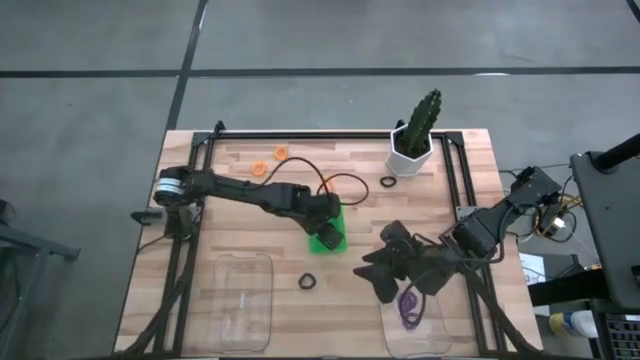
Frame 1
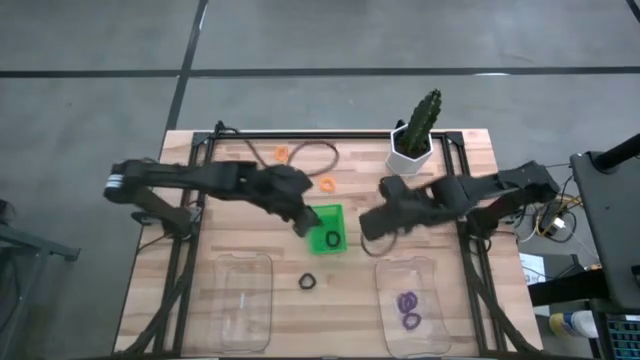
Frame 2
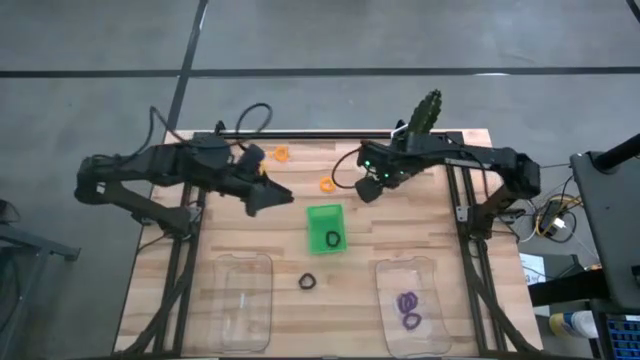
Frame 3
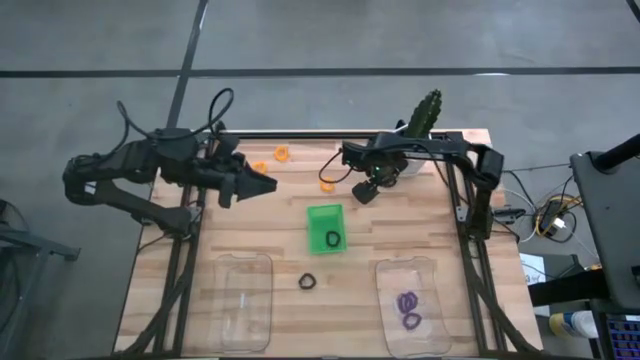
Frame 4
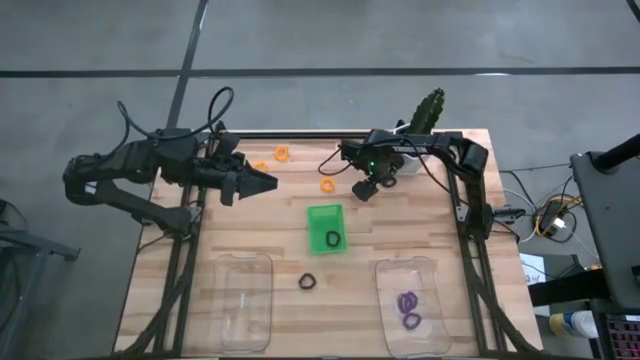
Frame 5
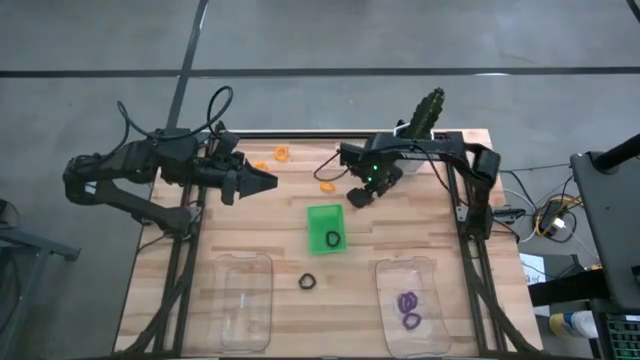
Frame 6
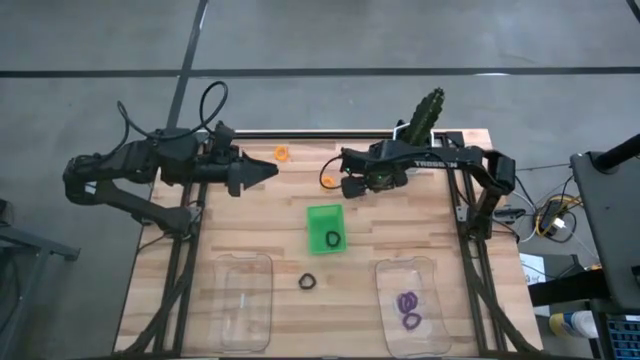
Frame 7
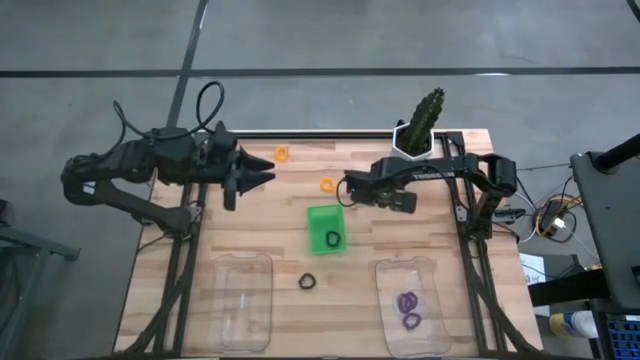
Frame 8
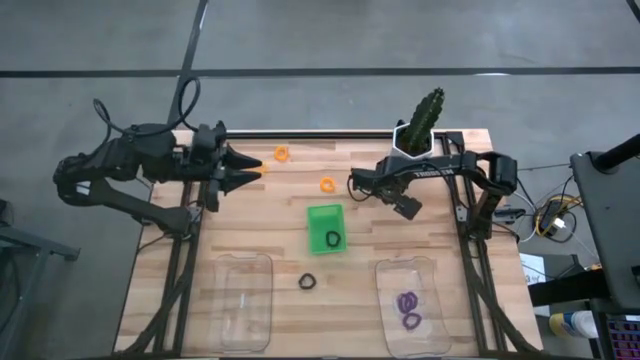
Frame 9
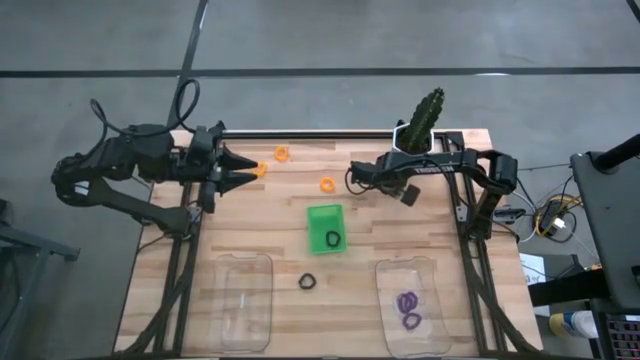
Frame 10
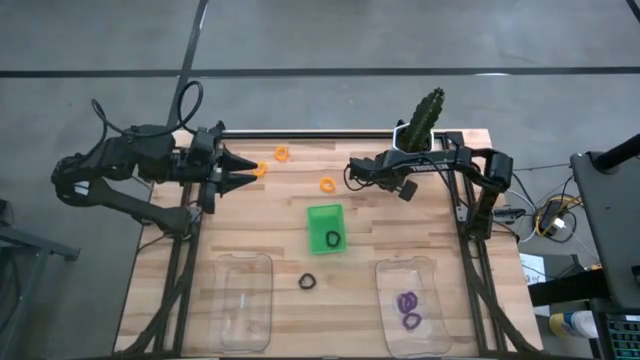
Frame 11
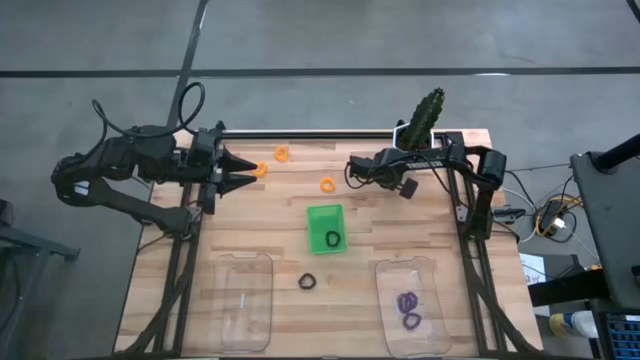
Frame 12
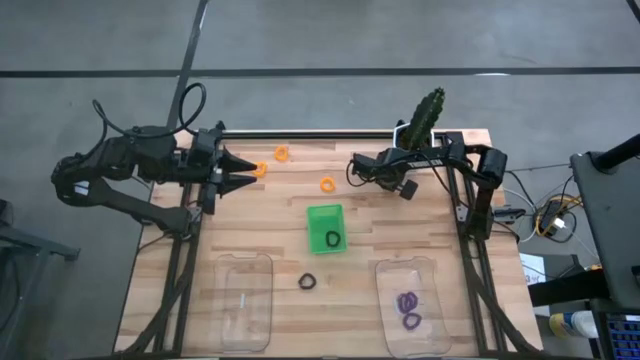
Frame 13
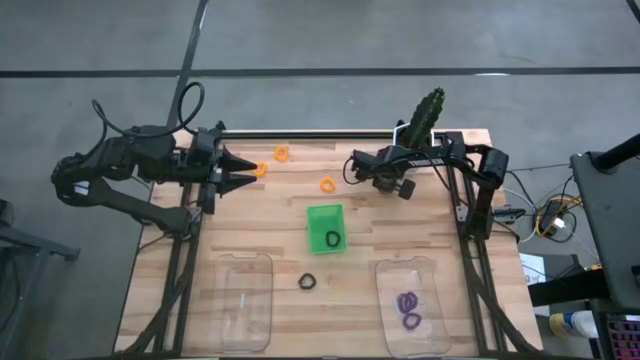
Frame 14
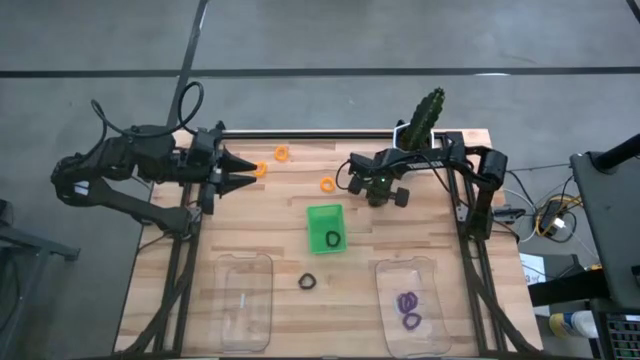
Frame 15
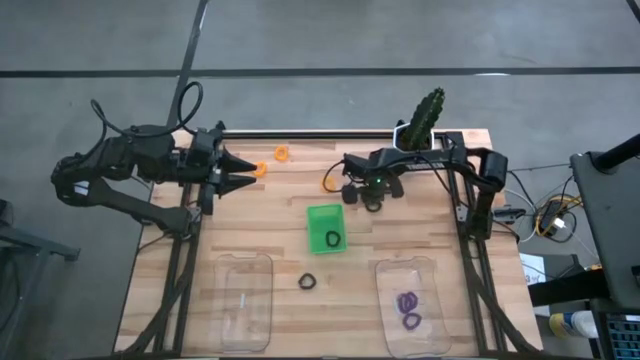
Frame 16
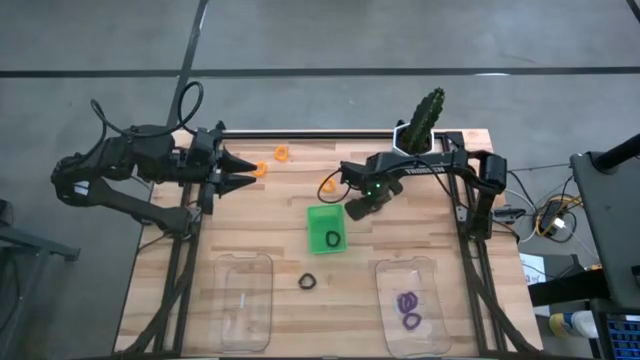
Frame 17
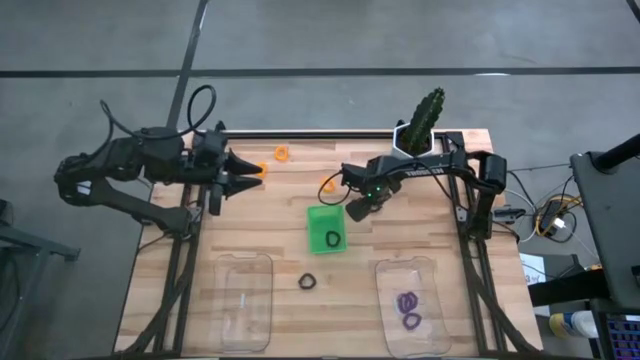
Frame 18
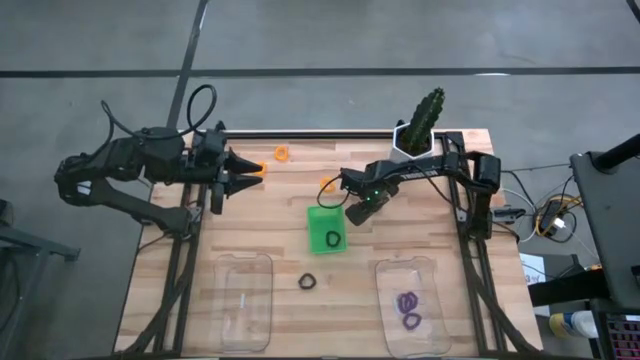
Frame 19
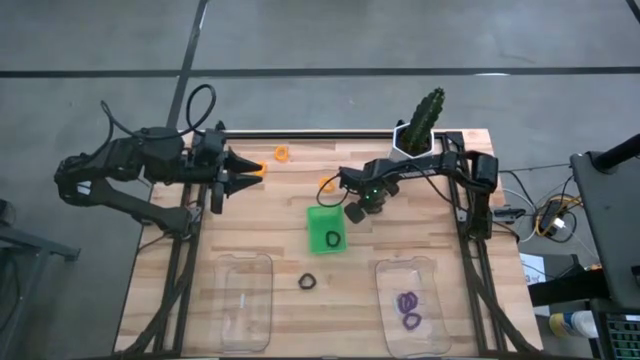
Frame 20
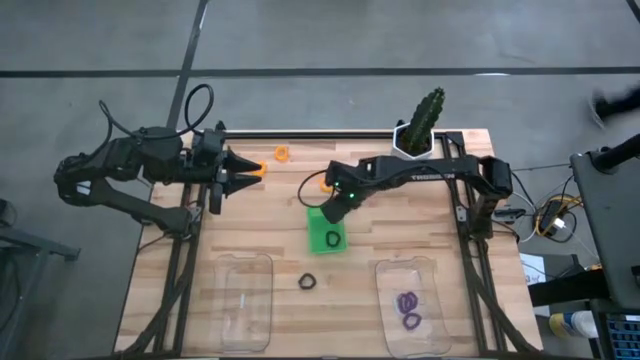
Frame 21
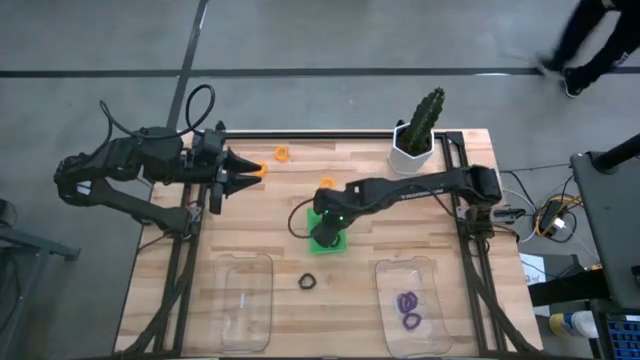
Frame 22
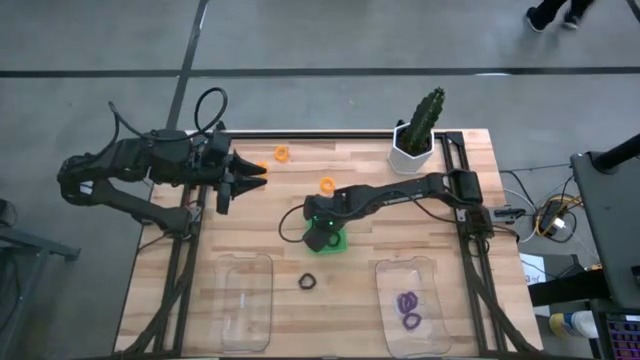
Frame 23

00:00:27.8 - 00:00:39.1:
Task: Sort spring keychains
Put the top black spring keychain into the green bin

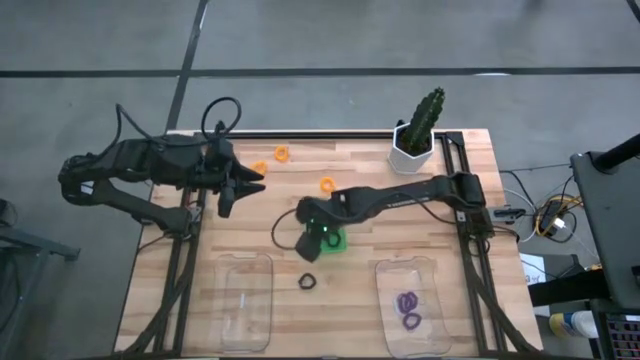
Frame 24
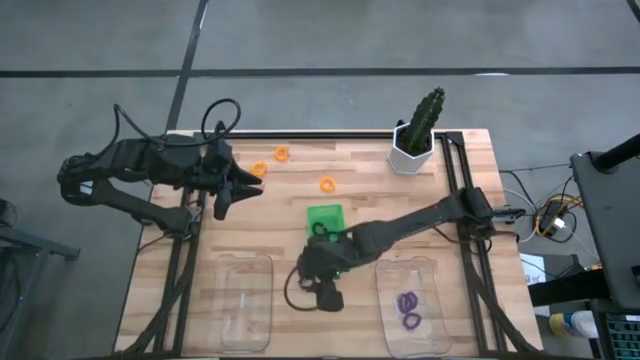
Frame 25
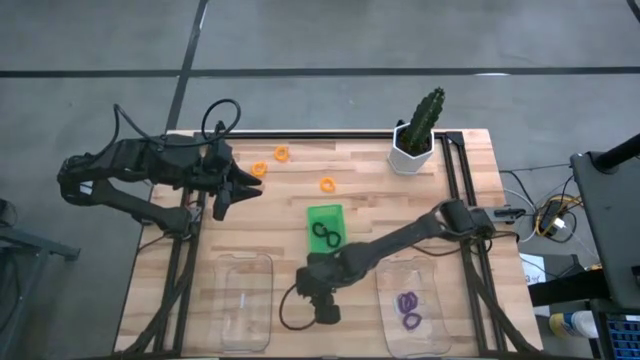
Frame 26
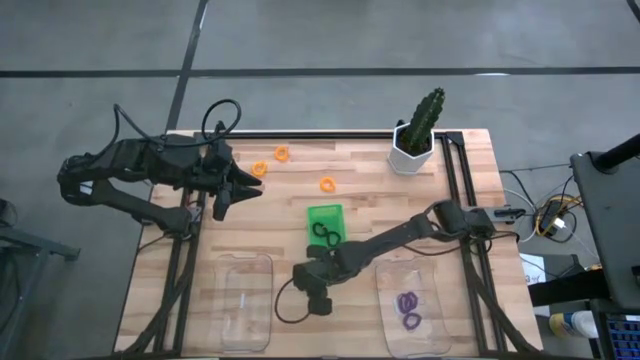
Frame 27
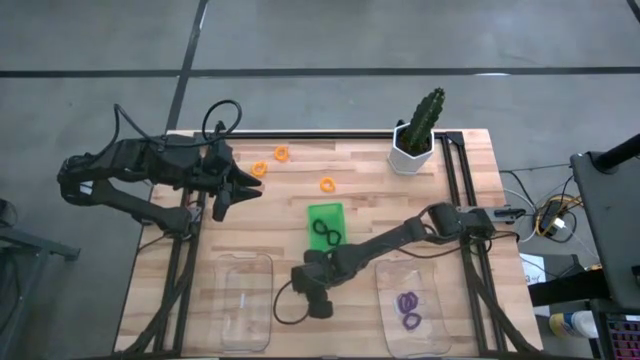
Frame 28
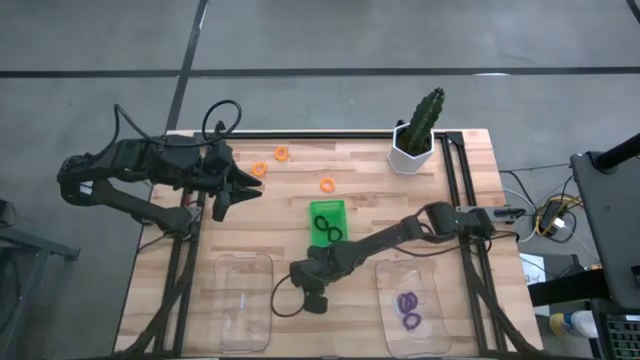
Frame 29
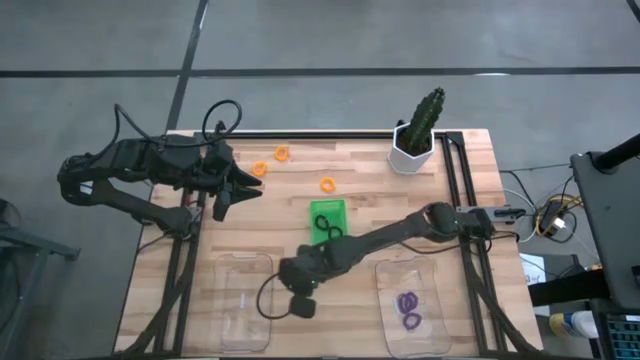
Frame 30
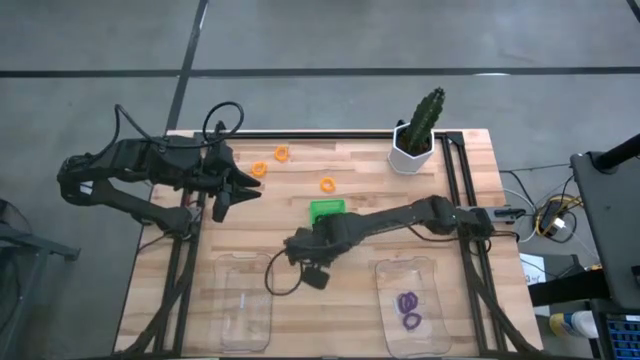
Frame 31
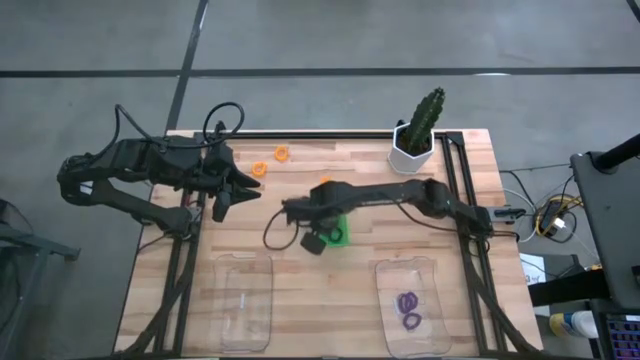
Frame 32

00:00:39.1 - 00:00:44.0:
Put the black spring keychain into the green bin

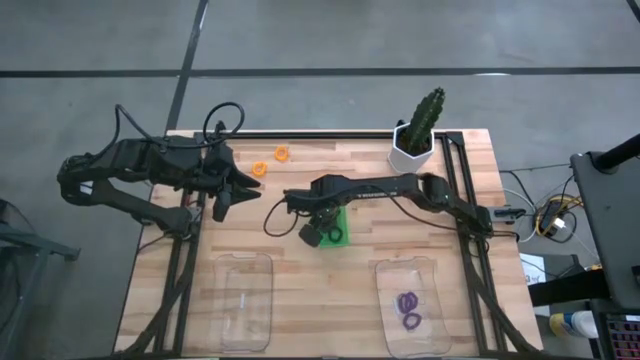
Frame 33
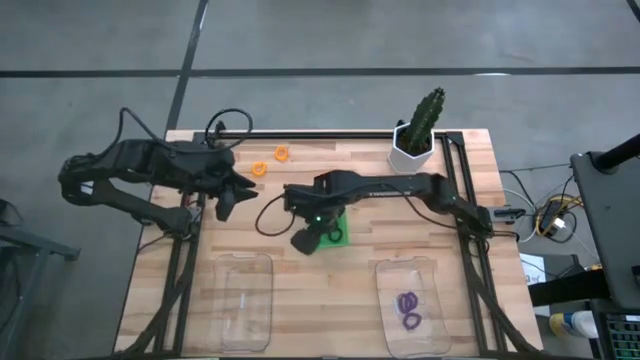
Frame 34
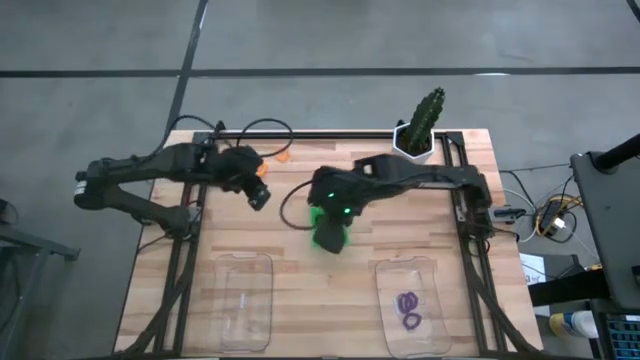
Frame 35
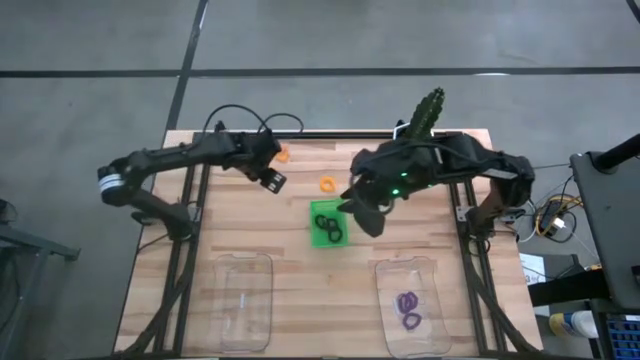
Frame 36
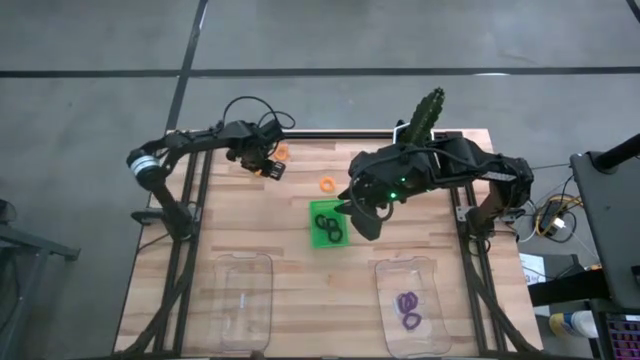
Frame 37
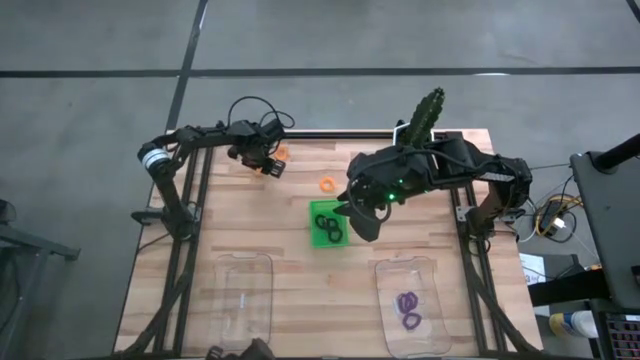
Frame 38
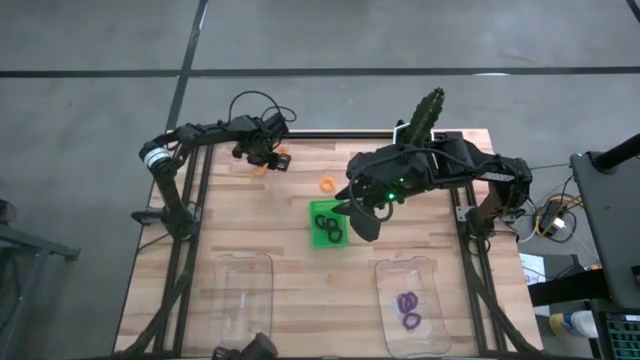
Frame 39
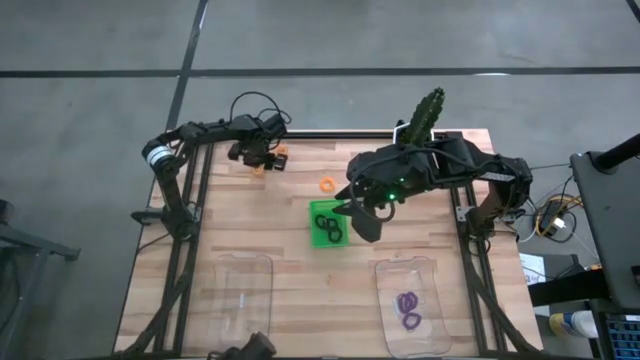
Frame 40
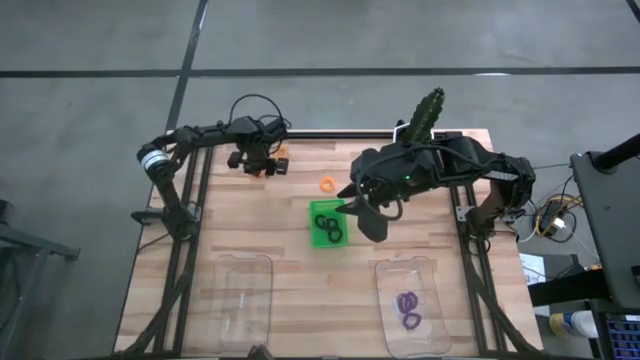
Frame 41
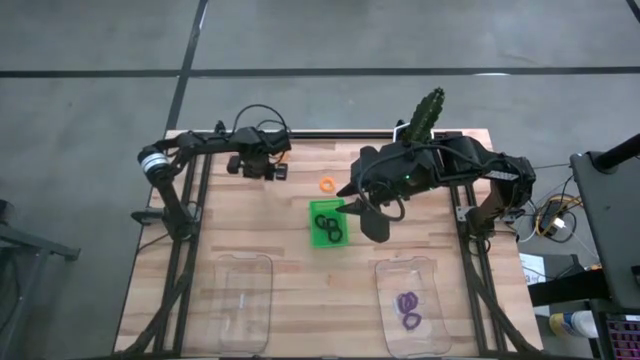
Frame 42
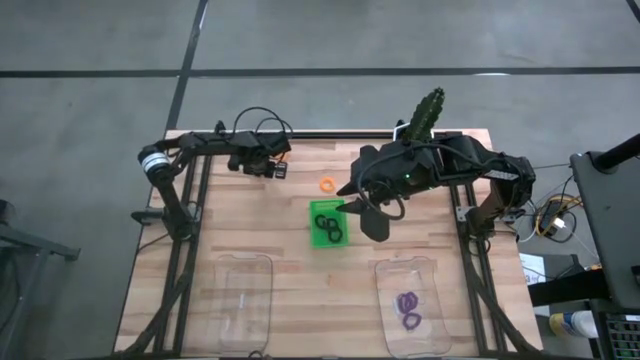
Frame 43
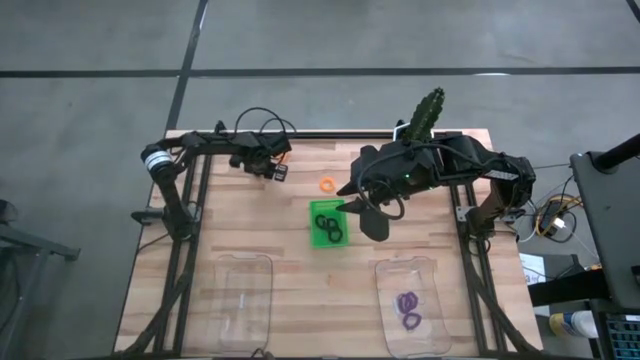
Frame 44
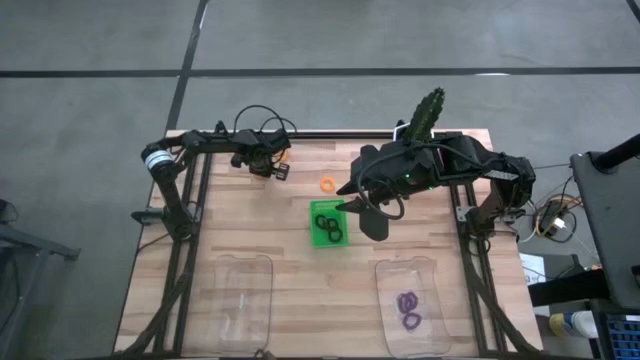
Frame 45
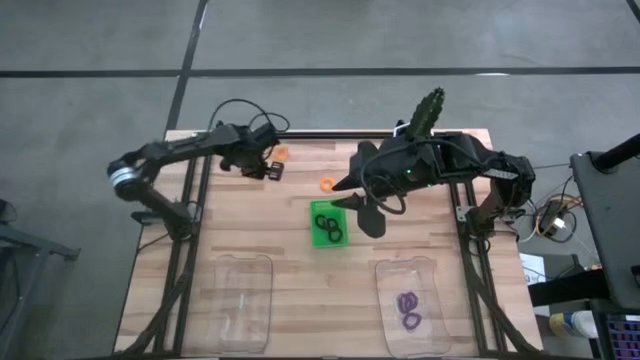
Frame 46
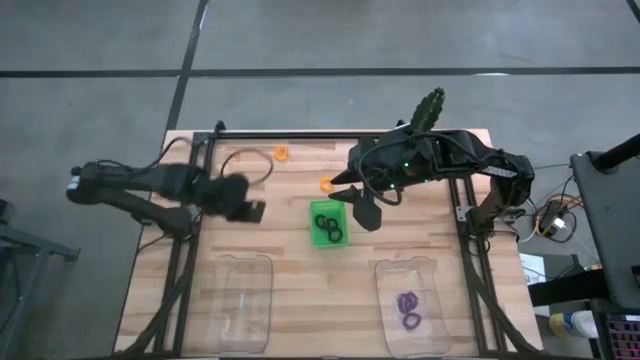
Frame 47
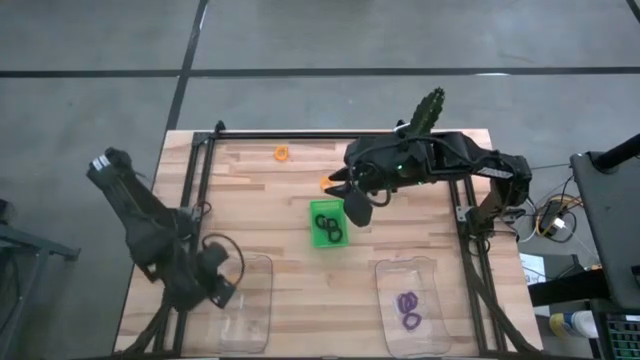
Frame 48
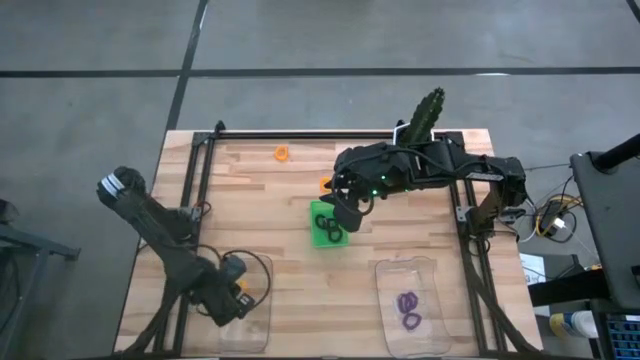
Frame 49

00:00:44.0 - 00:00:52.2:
Put the middle yellow spring keychain into the left transparent bin
